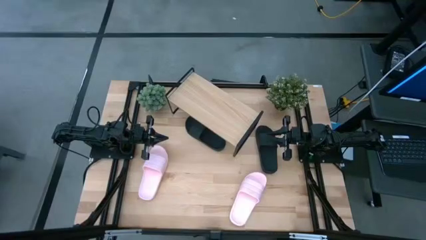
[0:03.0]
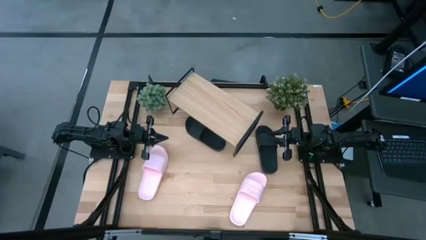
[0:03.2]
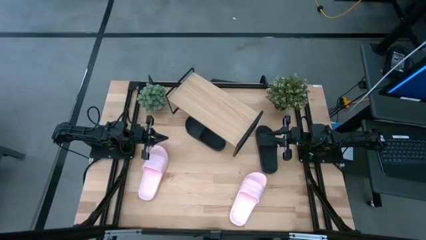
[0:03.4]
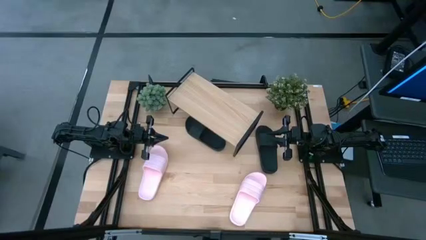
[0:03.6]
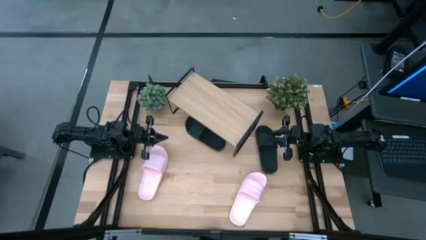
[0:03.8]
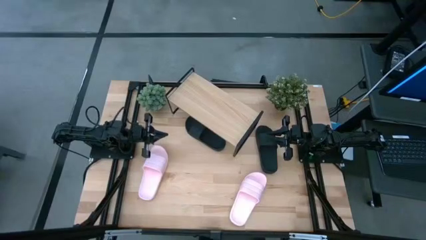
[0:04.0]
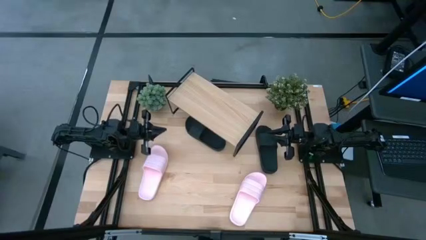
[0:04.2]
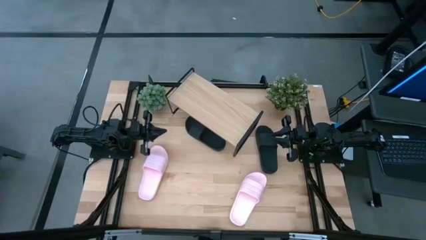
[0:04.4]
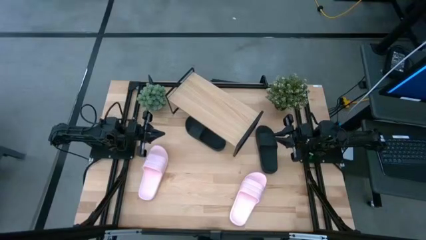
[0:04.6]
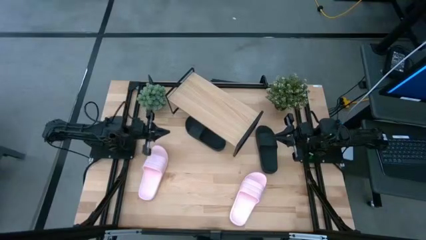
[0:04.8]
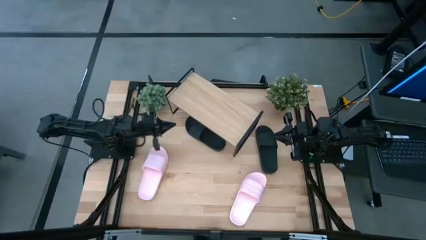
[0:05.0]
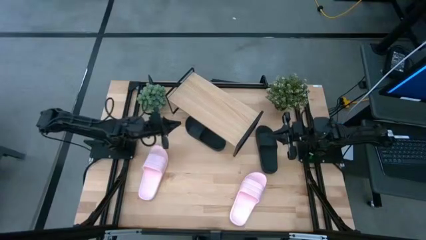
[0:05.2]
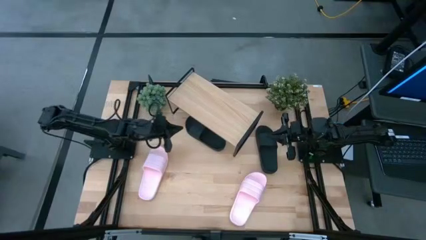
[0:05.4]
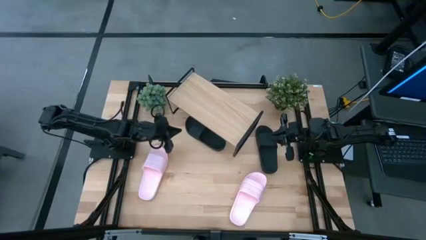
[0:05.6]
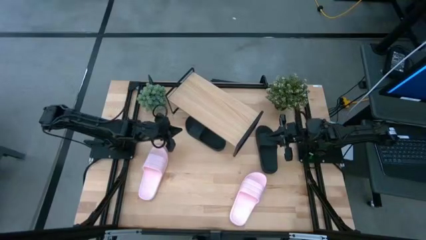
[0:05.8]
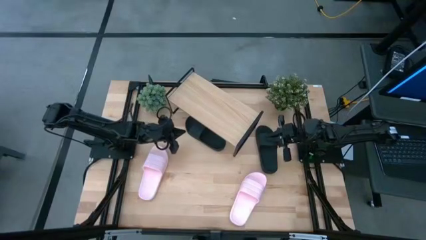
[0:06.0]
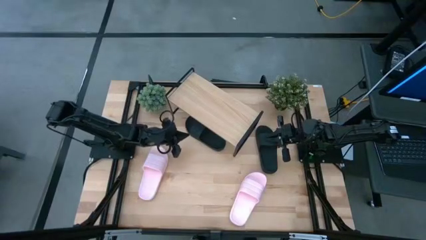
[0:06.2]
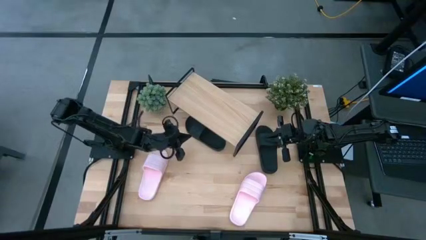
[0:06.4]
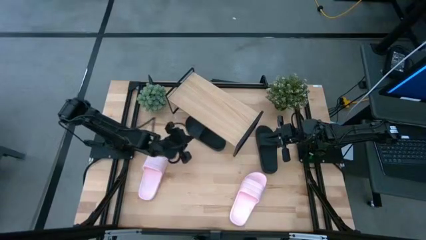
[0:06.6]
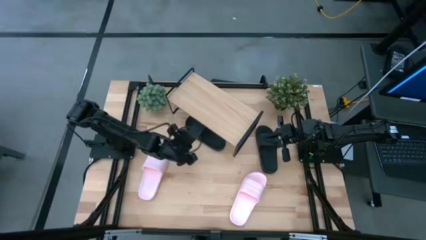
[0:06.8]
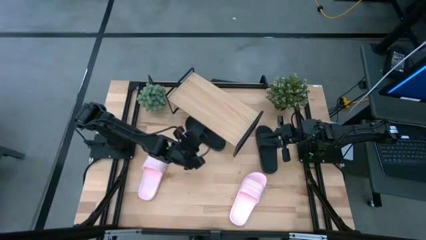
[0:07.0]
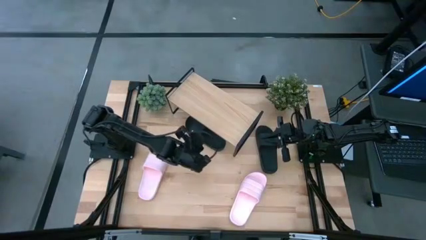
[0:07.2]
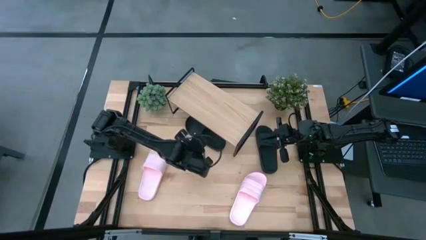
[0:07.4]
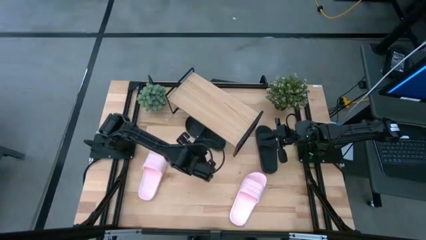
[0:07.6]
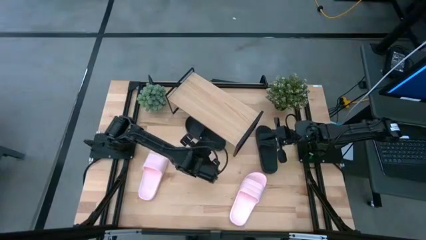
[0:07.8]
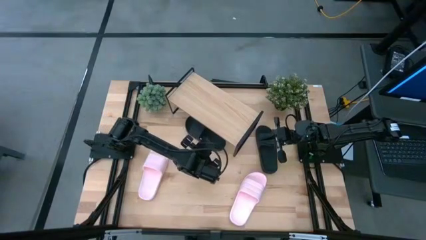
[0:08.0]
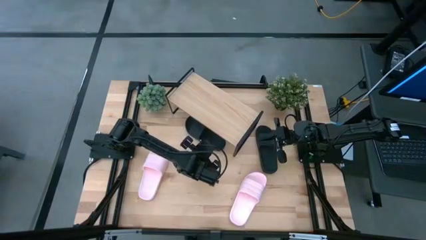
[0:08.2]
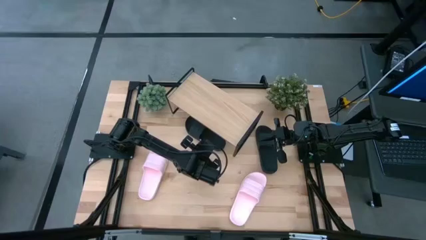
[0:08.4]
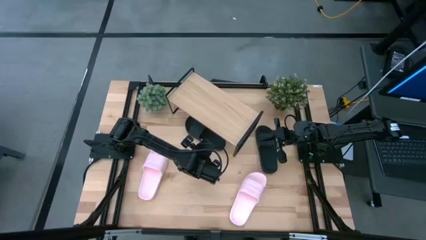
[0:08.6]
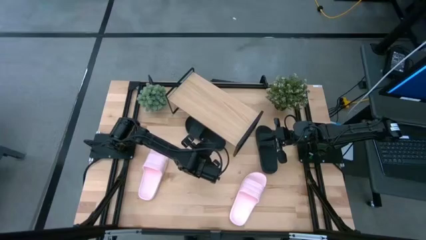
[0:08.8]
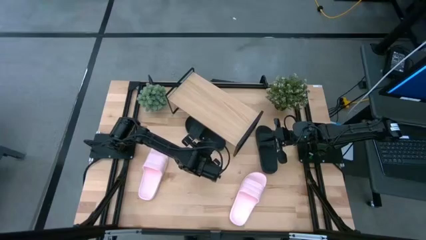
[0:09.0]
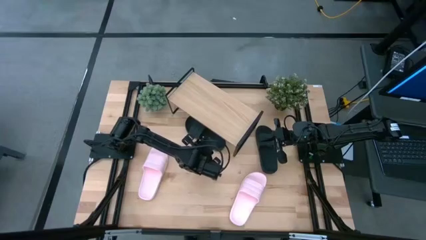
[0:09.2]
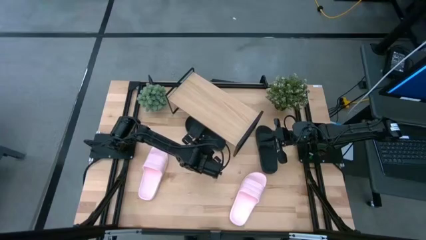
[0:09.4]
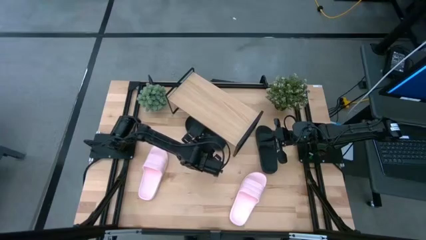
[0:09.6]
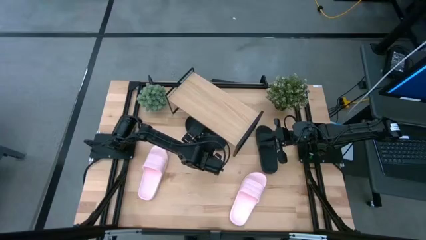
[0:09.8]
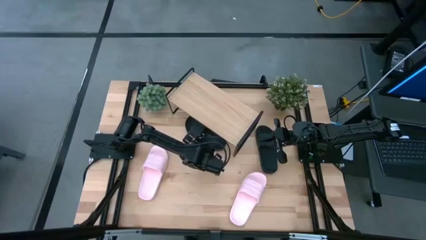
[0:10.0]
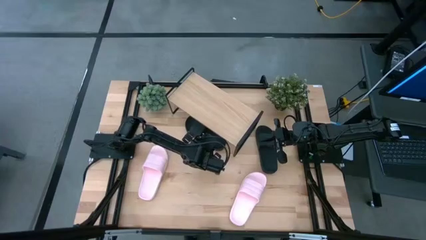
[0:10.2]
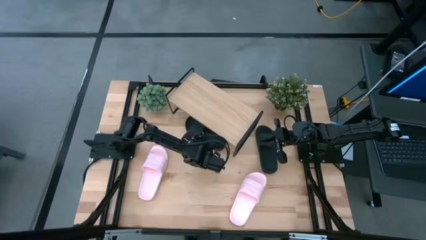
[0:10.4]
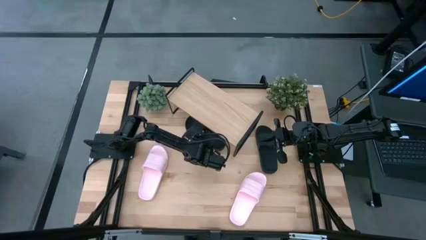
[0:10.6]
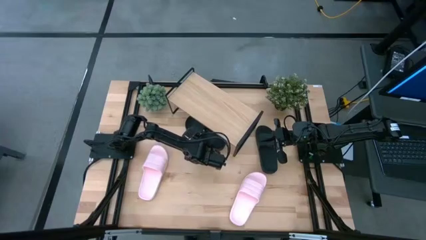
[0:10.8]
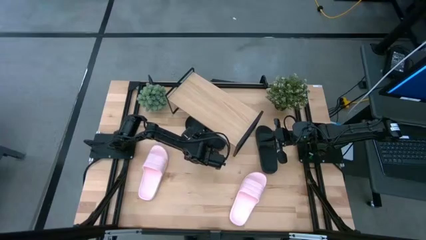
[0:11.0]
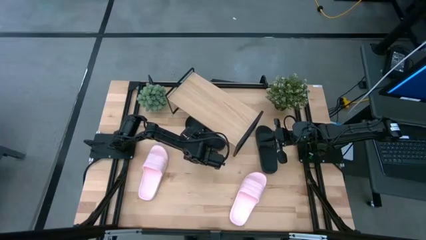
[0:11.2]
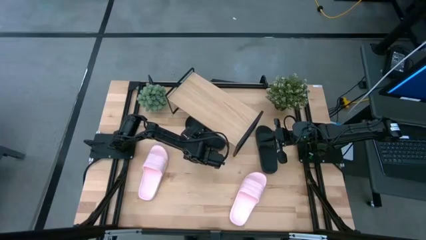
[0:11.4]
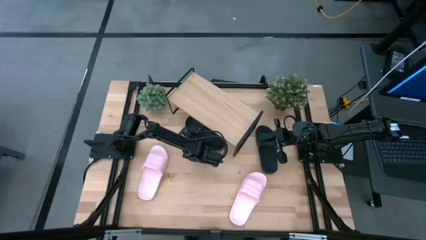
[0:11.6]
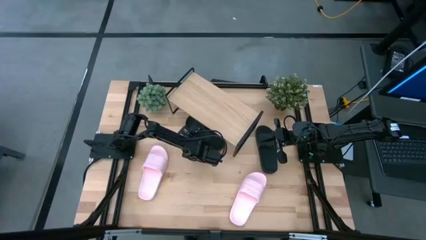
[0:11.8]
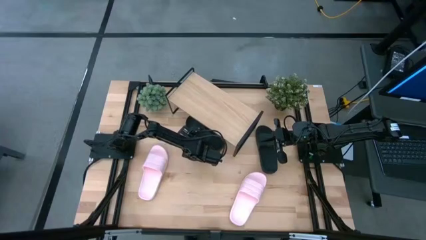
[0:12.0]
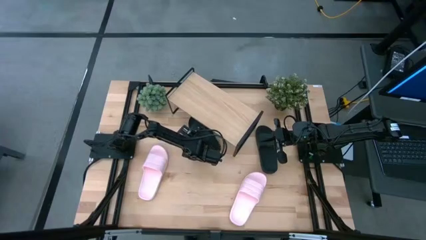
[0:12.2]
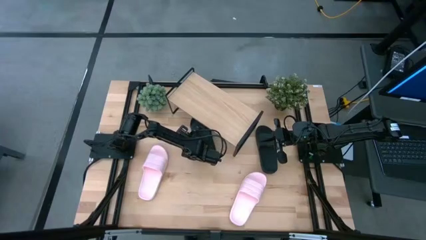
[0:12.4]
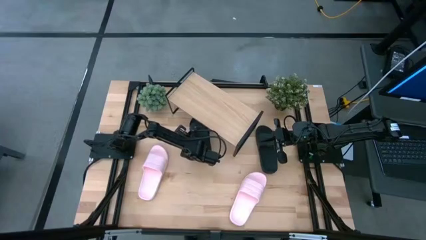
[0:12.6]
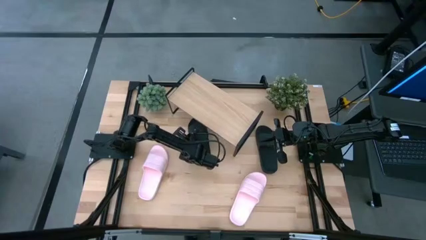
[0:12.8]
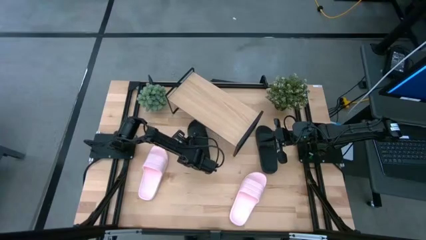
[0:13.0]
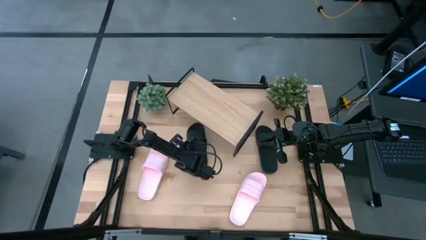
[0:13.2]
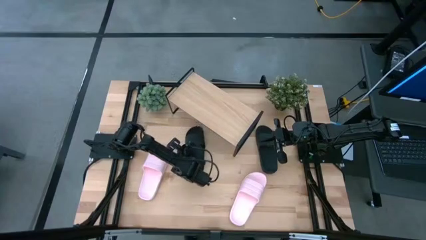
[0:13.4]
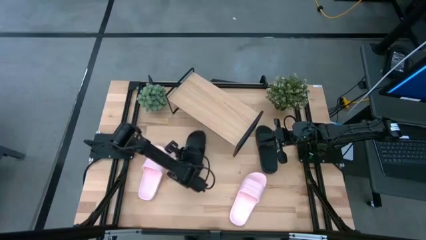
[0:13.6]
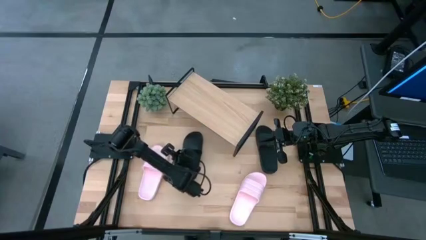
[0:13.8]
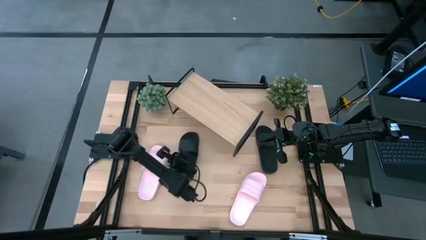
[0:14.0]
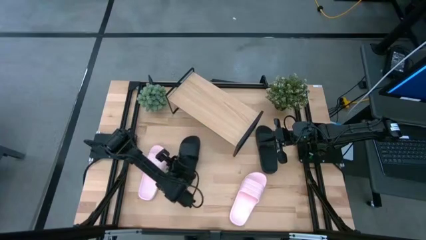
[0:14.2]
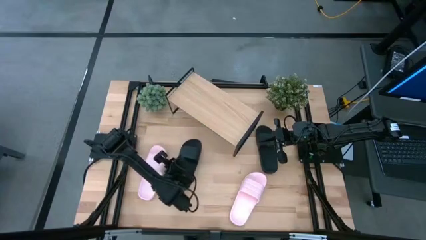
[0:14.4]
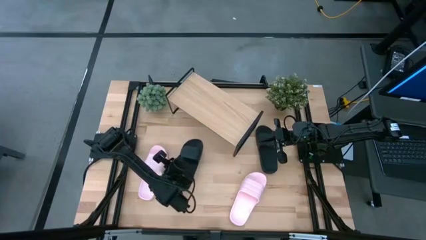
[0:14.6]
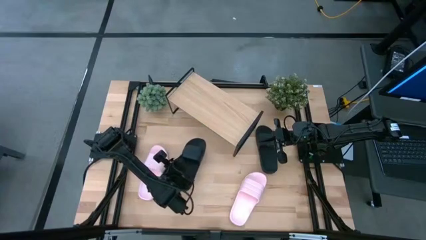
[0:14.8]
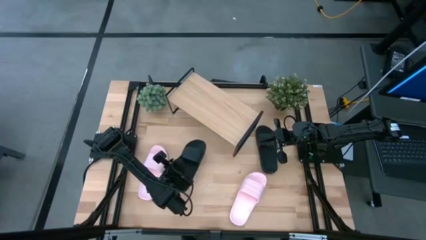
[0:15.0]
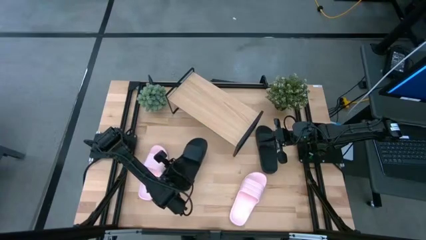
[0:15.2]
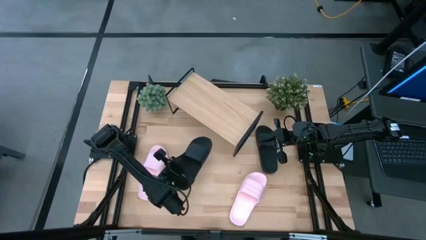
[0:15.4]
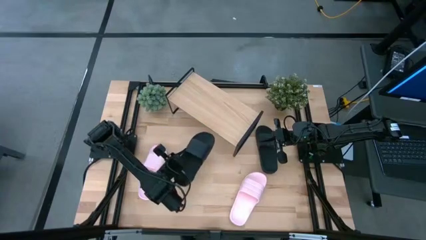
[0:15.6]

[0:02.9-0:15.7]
Task: Pick and place slides into the shelf
Put the left black slide on the shelf
